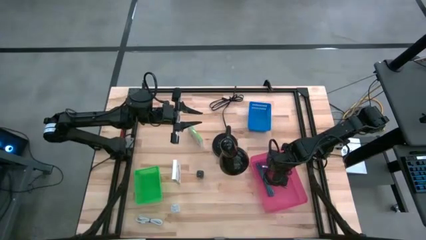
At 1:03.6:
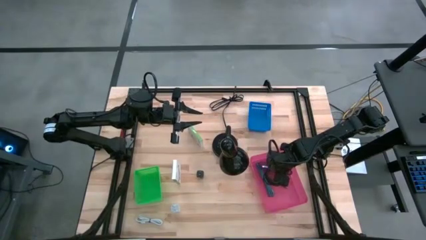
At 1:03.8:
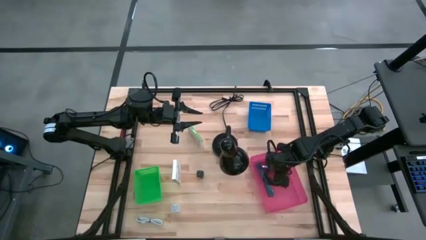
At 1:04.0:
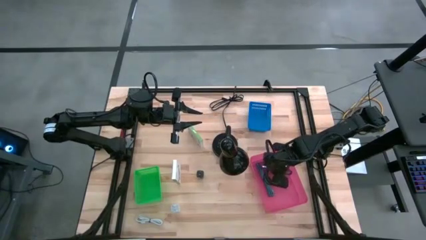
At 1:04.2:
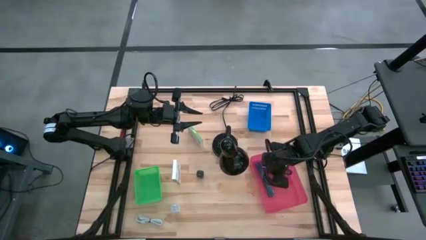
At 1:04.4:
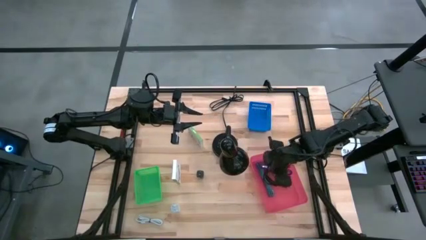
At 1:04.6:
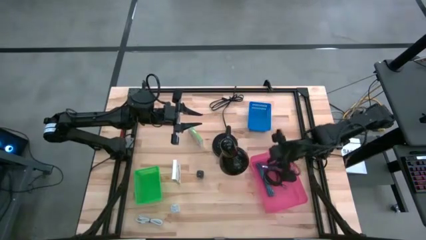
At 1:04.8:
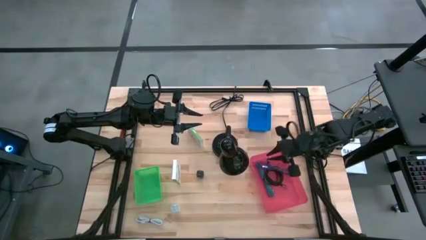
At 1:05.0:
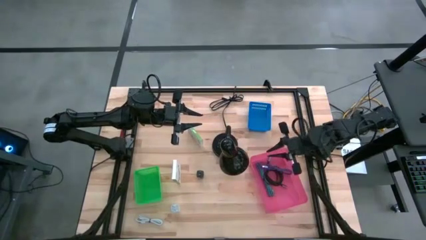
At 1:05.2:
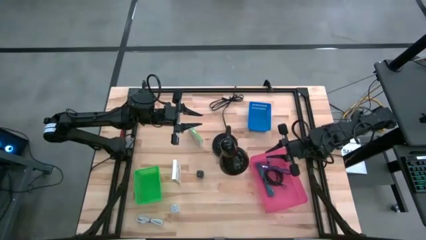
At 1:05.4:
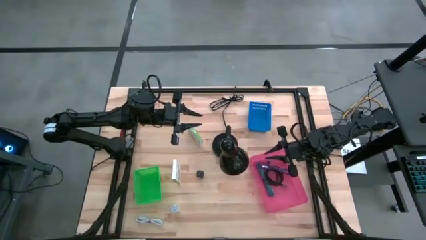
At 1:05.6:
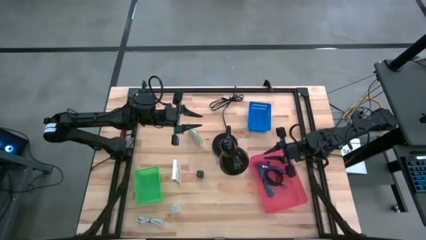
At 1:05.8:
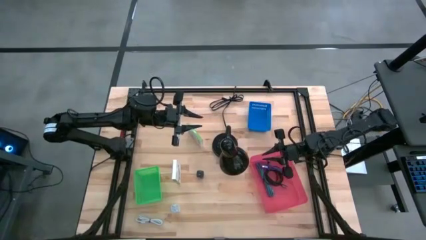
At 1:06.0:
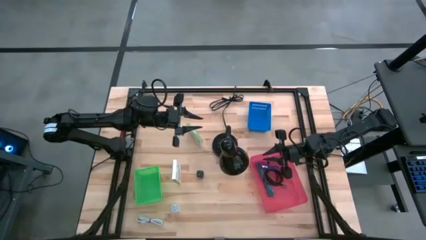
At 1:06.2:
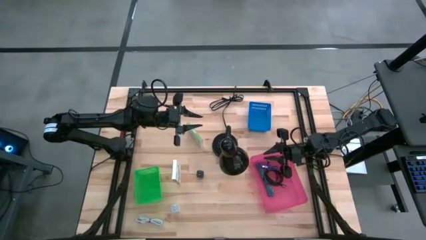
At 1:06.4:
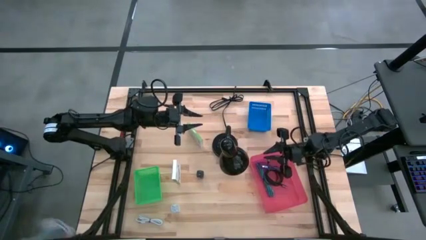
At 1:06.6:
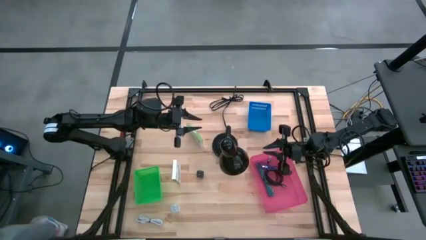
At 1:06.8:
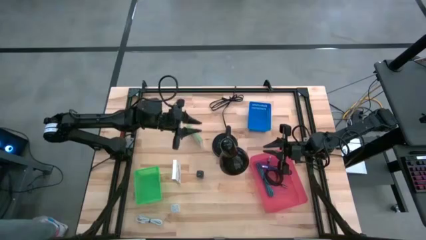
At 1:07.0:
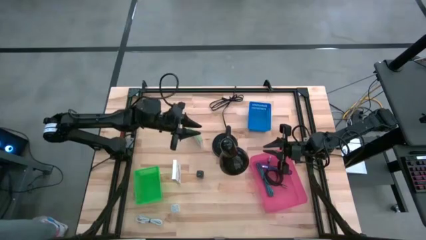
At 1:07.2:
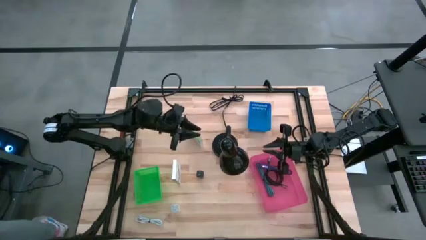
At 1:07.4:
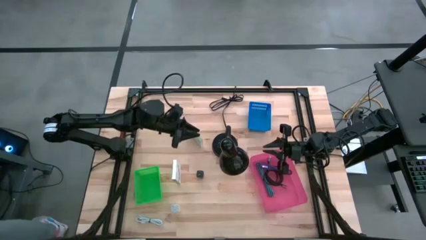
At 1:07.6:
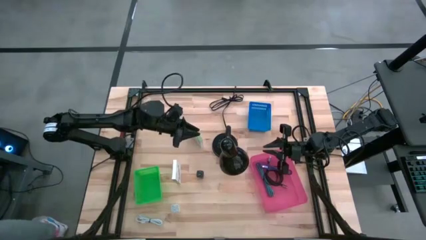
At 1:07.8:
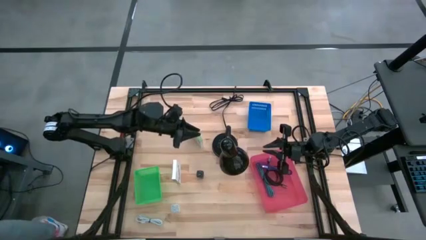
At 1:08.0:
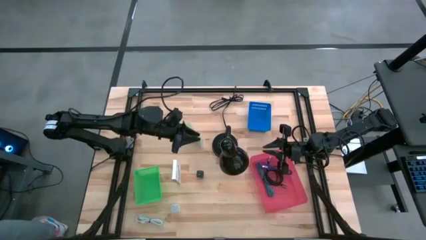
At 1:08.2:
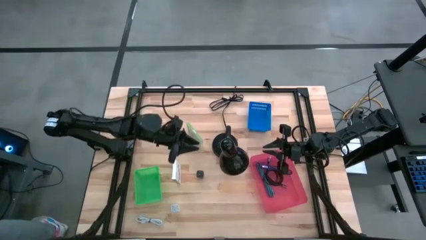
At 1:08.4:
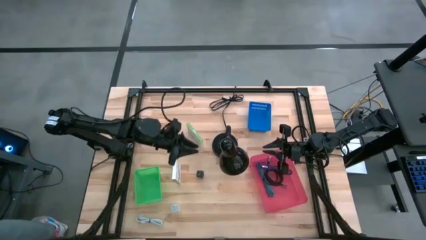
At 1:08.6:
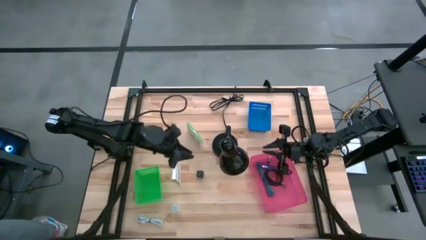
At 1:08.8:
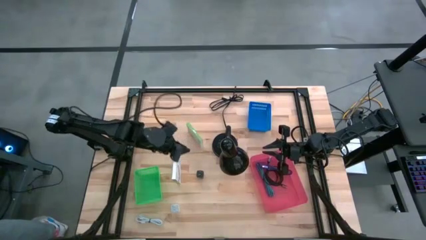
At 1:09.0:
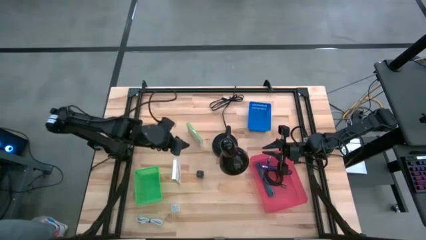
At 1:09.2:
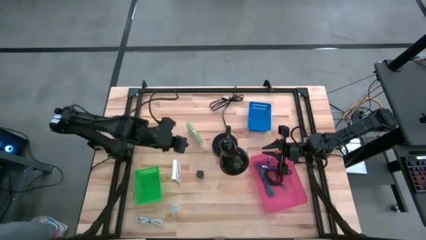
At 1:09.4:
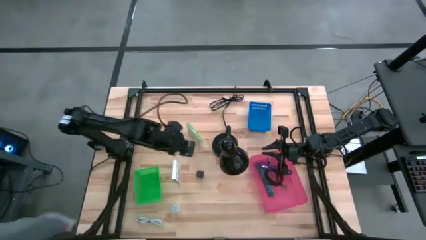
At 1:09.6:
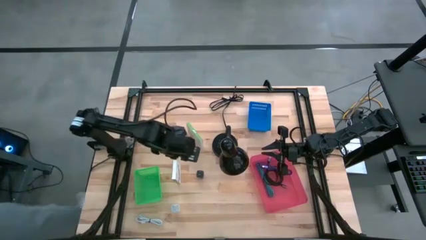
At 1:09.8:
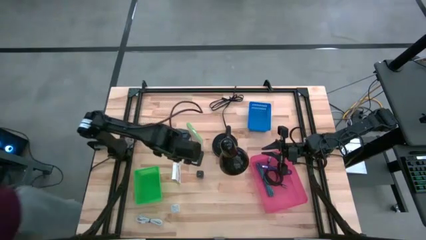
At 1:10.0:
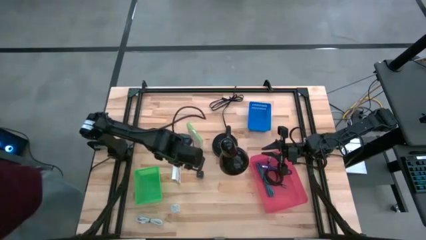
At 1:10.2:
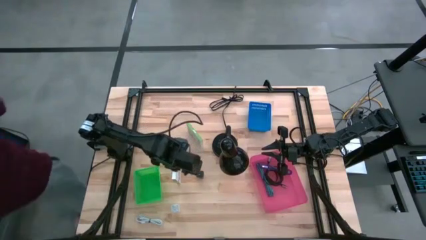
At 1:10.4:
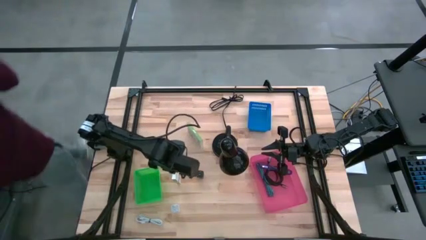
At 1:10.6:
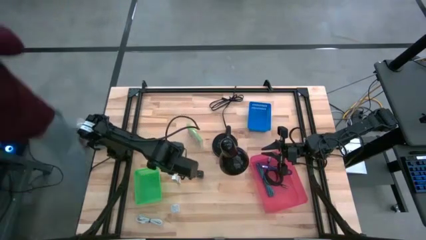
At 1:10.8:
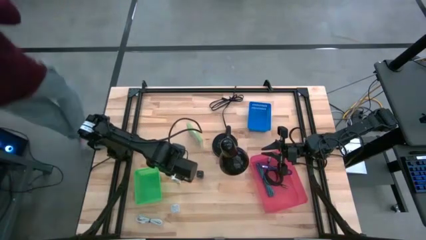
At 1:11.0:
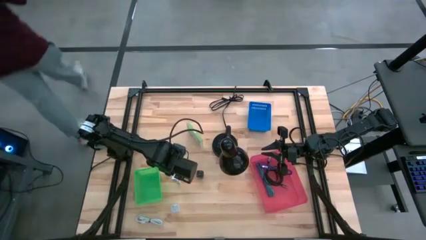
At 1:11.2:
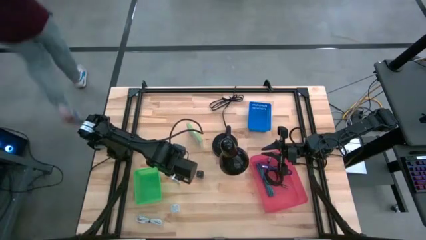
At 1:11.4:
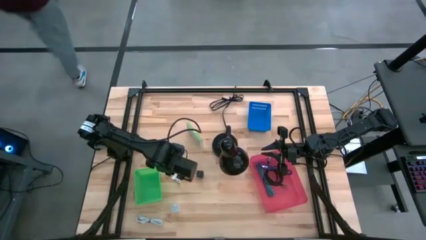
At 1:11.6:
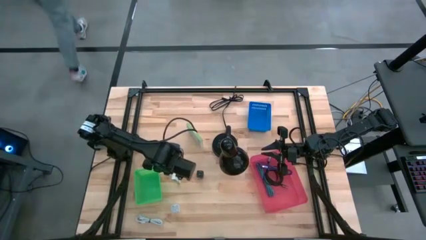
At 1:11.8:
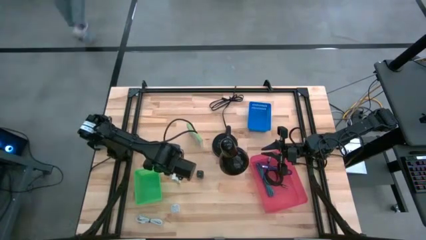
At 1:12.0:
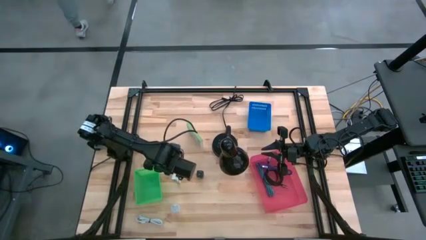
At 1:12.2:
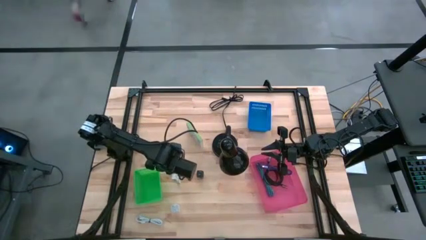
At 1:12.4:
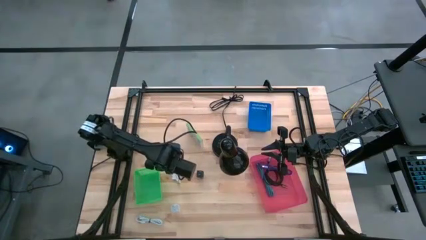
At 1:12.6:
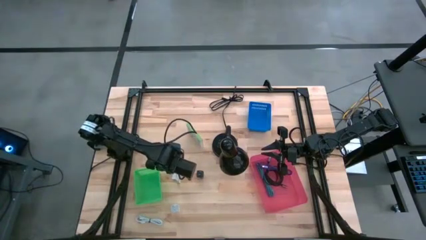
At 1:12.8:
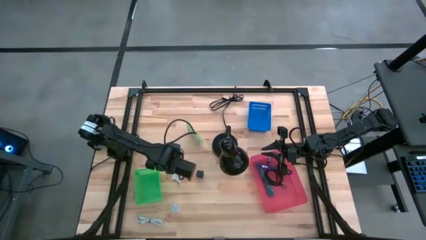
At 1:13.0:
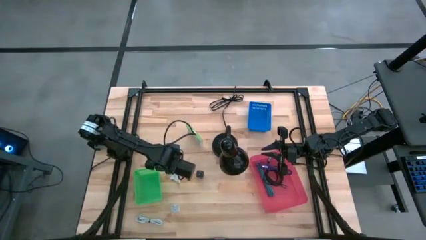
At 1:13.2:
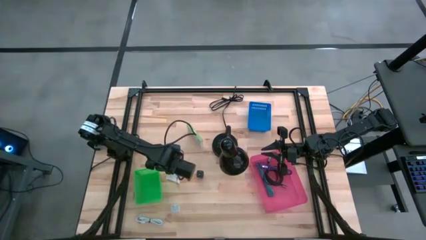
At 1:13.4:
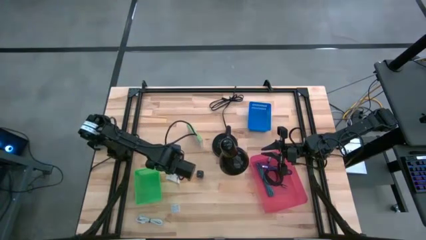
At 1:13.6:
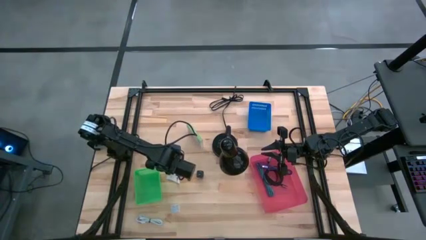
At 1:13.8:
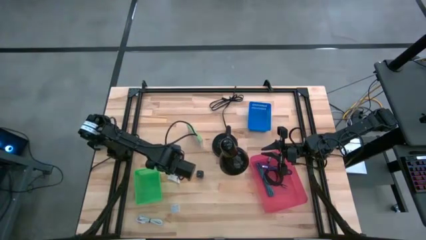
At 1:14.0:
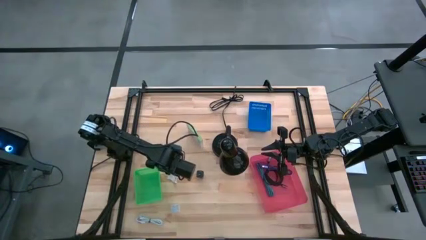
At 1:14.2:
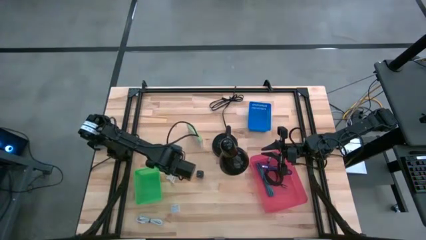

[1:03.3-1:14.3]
Task: Pick and place items into bin
Put the bottom white card reader box into the green bin

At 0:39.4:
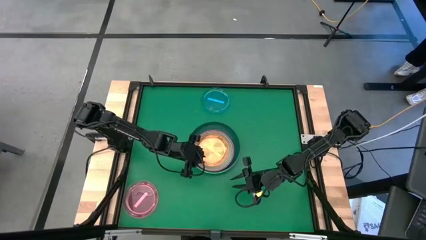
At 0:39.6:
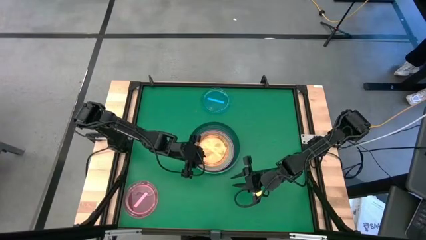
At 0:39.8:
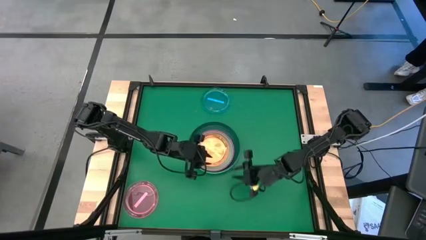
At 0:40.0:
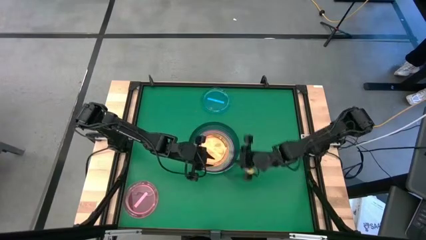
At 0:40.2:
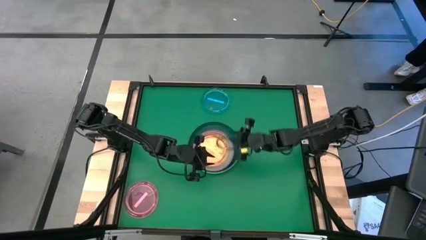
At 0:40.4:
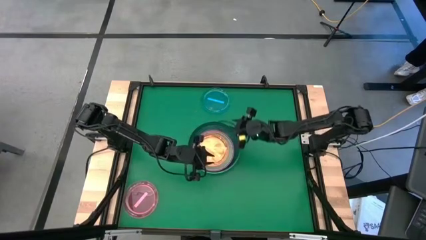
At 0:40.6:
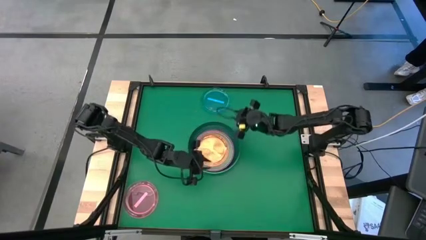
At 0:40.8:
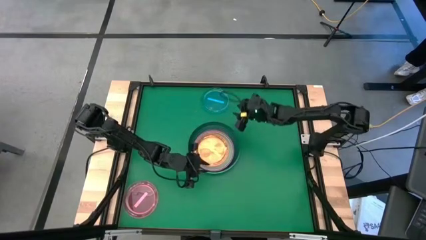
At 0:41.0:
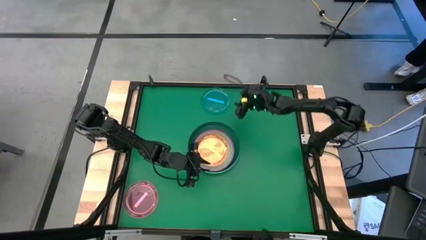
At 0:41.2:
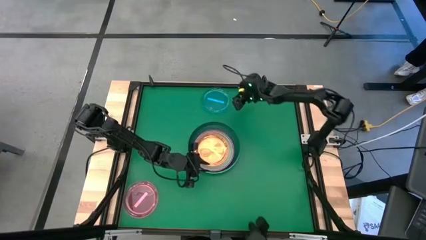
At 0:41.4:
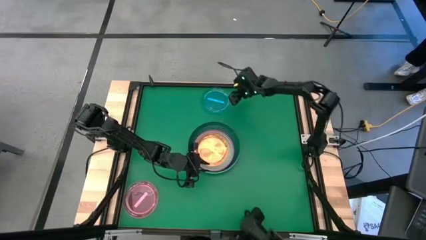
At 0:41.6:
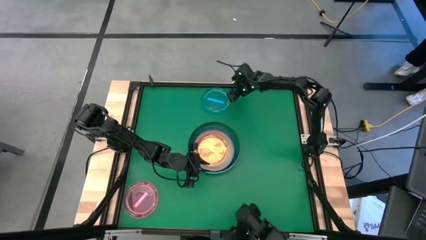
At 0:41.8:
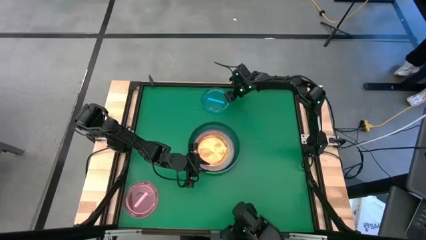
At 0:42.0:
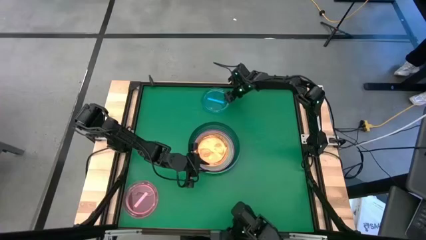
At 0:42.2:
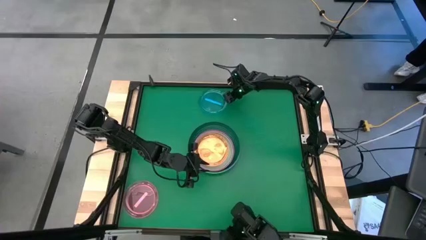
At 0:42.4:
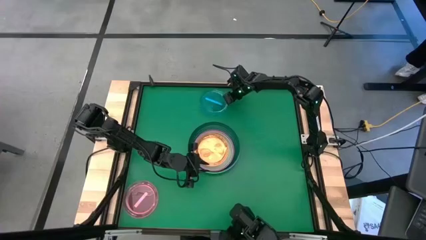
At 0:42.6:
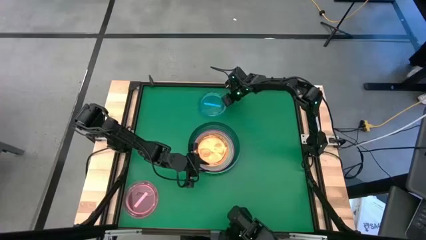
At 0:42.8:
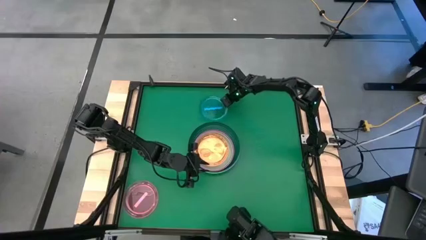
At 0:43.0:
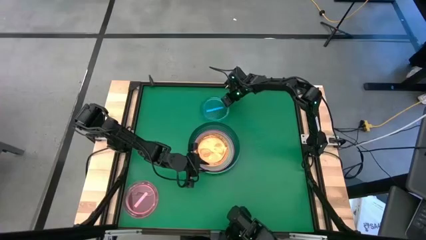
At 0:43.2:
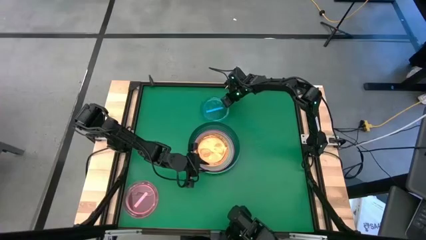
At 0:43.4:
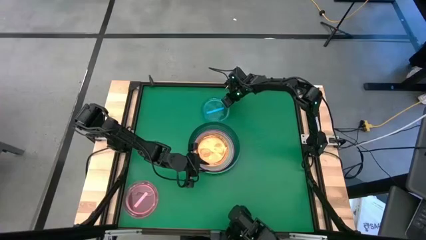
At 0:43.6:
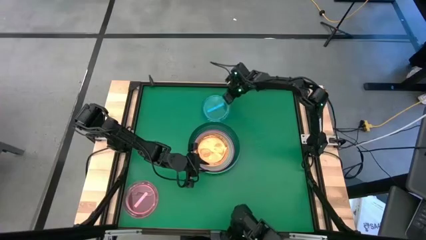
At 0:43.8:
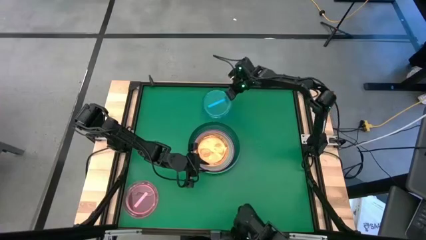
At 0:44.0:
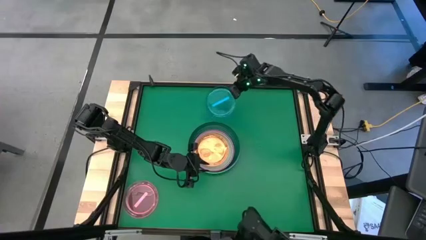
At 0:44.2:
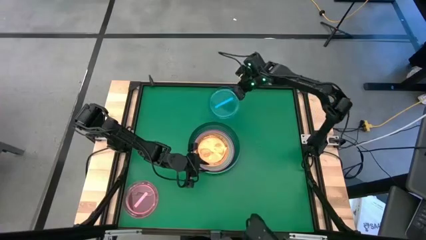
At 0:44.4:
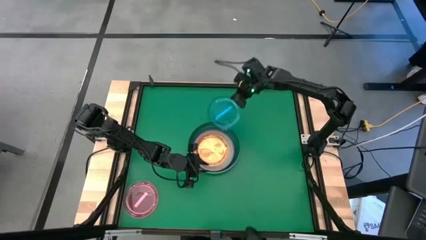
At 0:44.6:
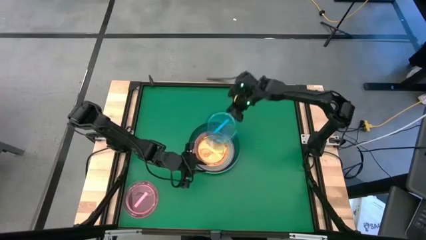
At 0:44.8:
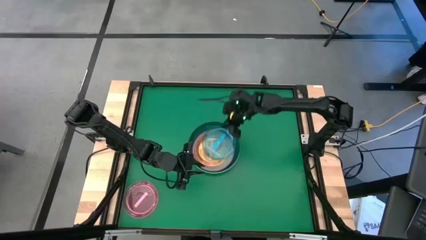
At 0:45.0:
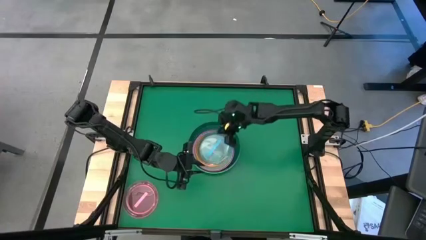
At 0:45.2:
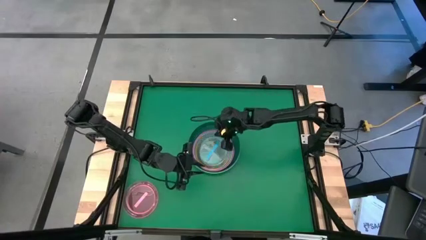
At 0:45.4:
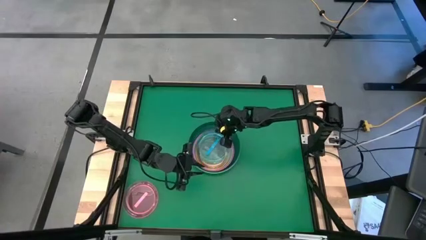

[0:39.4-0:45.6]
Task: Stack plastic plates
Stack the blue transparent plate on top of the orange transparent plate
